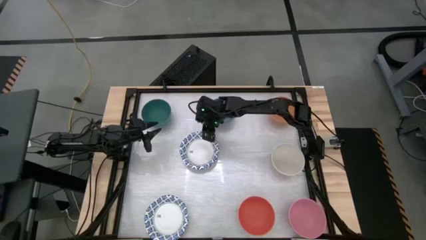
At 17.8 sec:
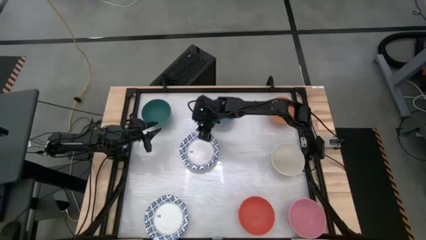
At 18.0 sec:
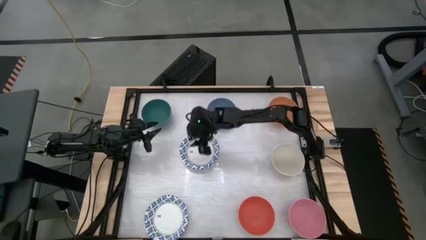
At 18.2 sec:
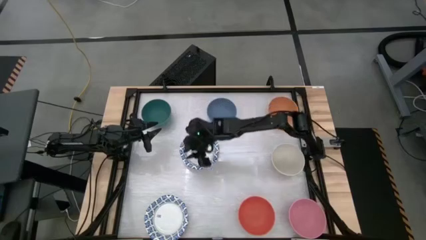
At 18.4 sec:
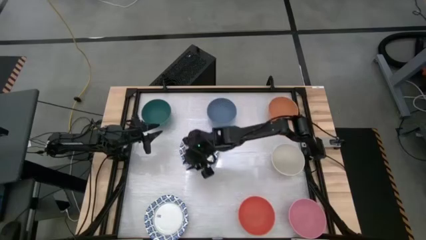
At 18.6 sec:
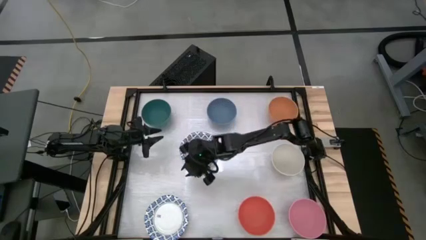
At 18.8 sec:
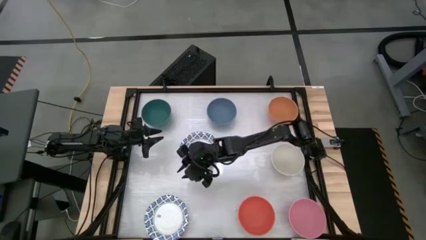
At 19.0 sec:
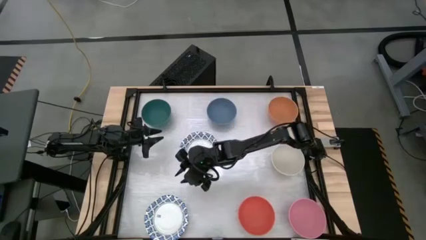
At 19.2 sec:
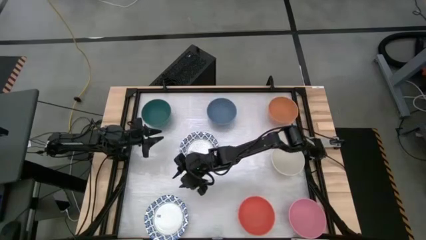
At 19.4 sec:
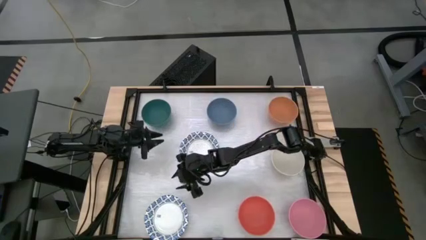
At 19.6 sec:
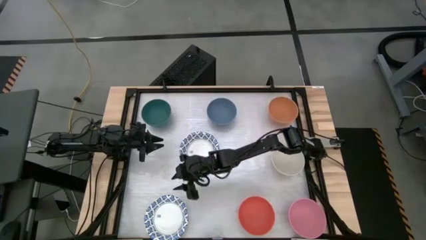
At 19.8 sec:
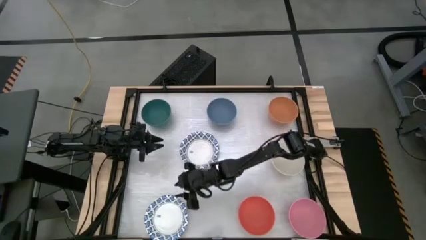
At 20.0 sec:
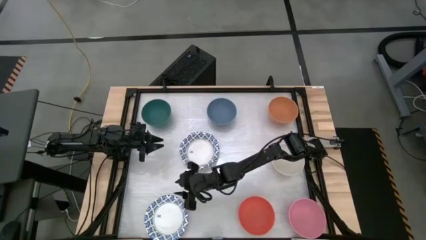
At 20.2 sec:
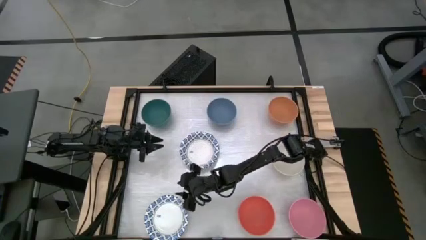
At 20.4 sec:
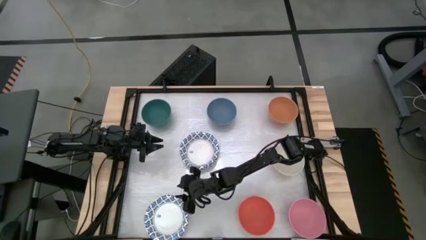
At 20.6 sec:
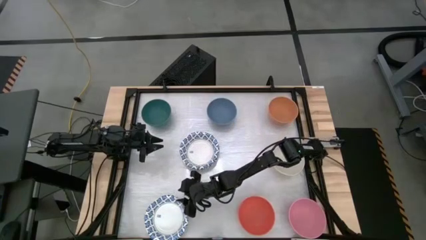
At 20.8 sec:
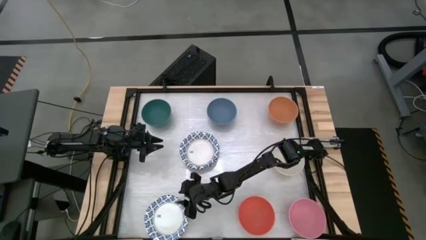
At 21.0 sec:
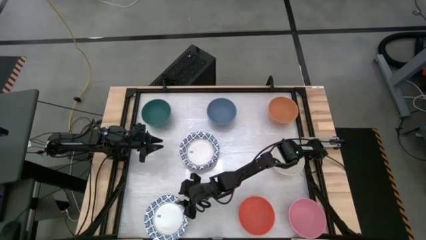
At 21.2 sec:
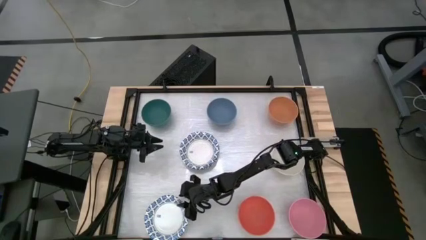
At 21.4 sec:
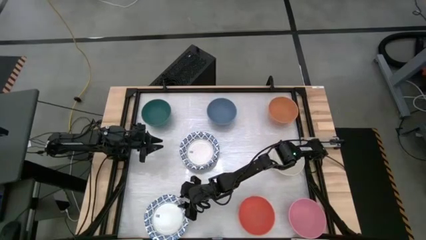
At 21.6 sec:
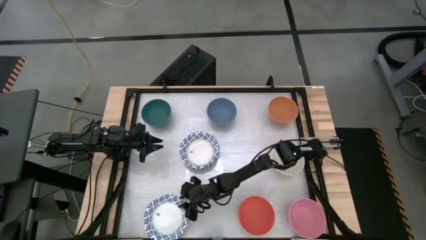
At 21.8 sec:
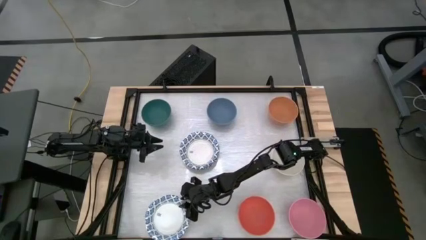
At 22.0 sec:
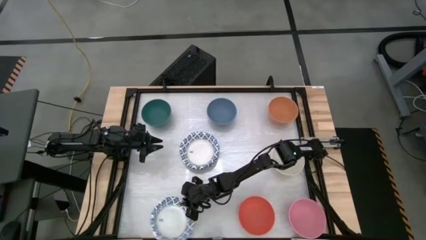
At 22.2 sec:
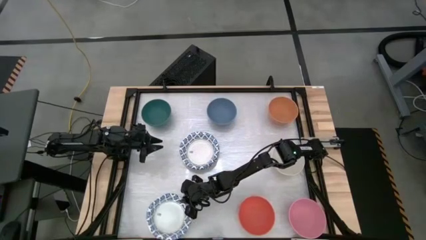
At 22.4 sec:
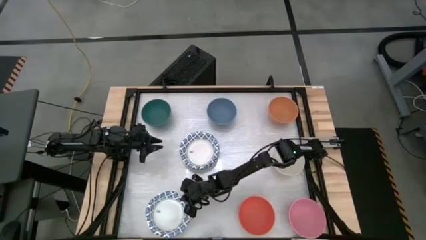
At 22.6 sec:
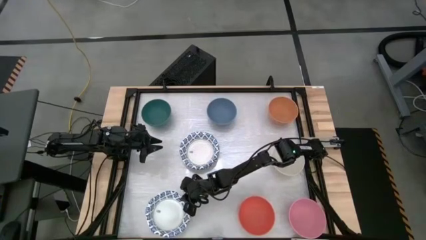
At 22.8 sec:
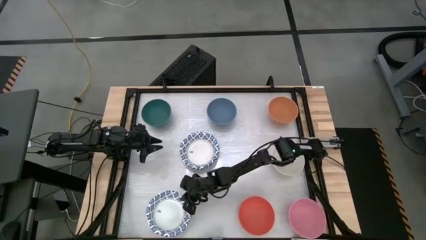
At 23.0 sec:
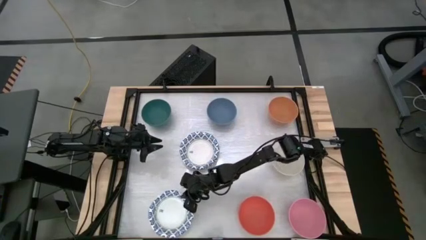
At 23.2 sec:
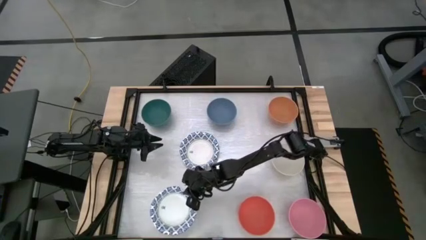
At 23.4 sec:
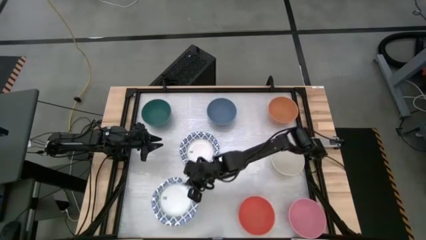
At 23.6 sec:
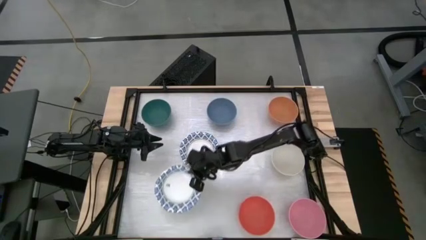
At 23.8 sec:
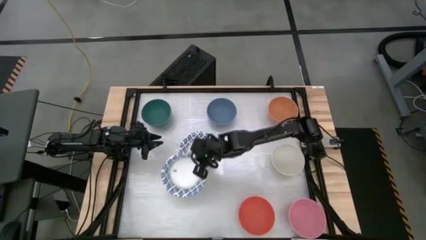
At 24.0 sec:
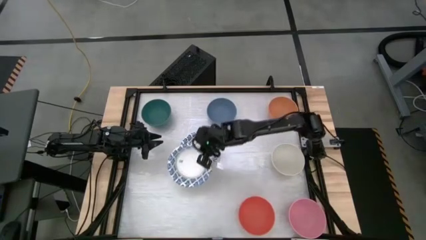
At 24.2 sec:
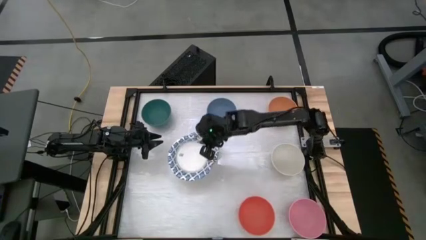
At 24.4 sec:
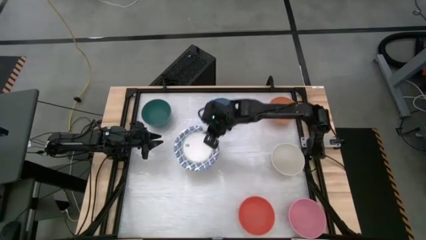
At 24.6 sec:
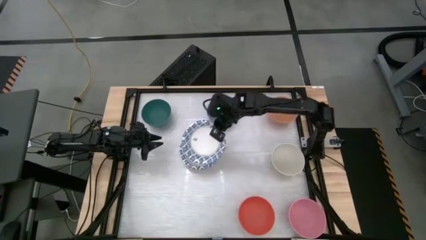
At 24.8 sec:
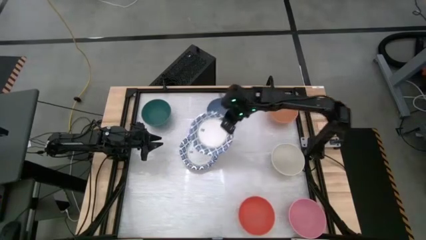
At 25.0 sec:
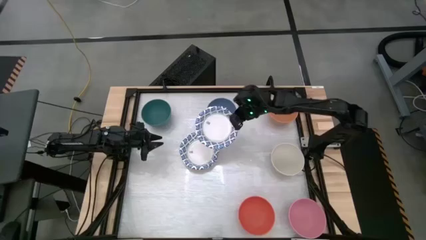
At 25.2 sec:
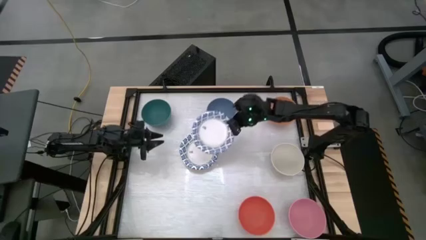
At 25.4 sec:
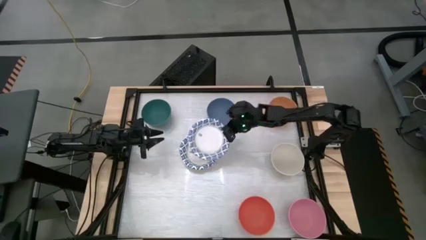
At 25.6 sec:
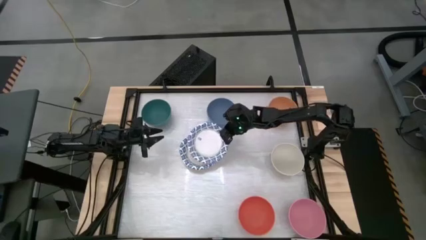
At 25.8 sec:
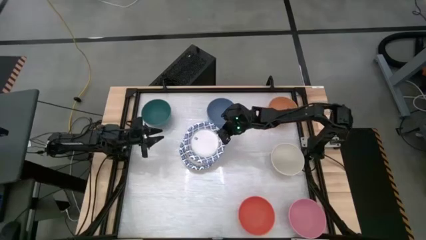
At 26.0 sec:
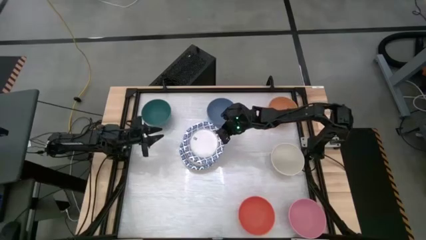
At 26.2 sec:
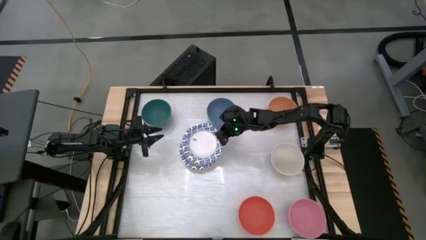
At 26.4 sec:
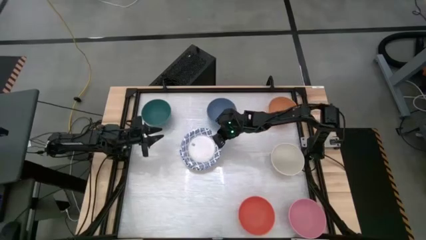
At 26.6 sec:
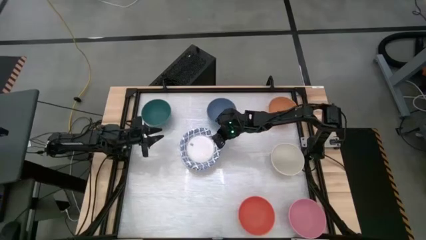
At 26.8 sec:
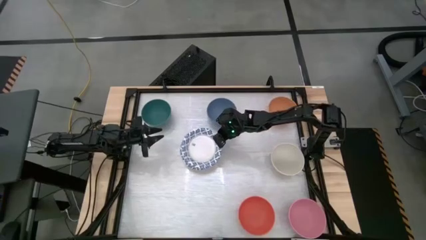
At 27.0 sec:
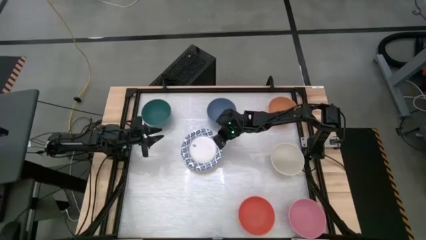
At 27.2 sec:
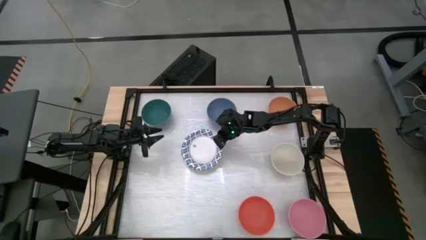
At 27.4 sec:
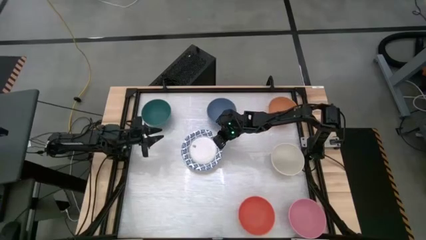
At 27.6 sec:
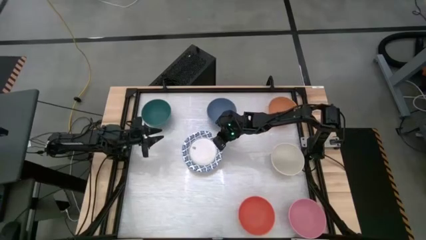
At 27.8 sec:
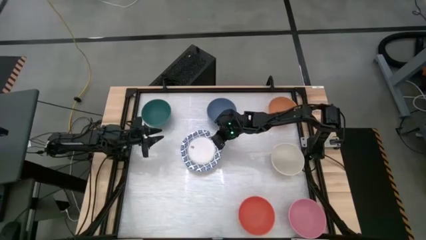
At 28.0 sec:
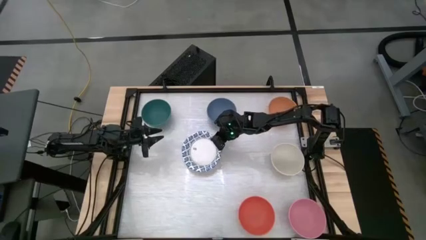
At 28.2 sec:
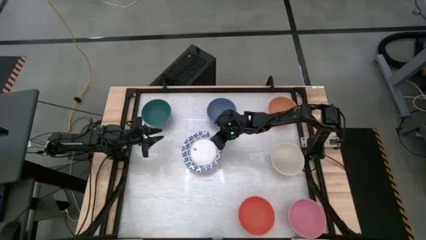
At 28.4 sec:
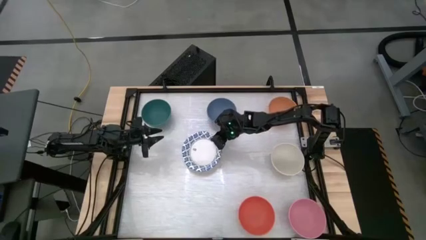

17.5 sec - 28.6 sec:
Stack the blue patterned bowl on top of the blue patterned bowl
